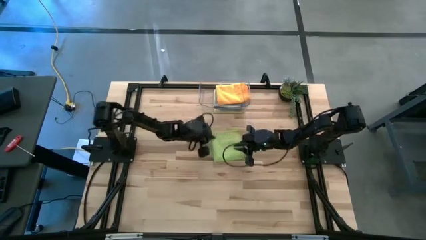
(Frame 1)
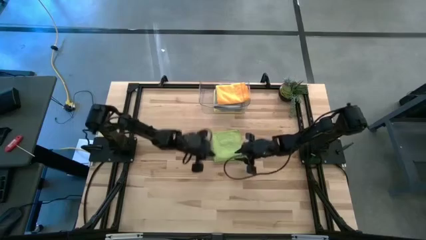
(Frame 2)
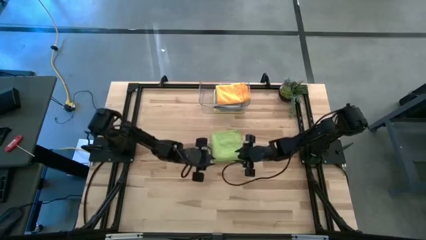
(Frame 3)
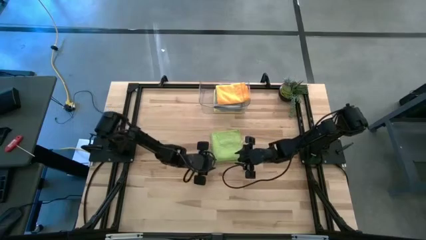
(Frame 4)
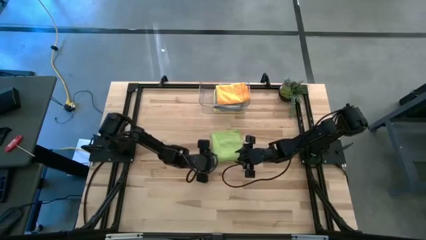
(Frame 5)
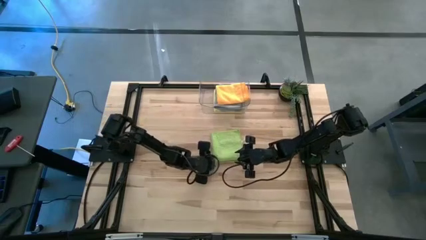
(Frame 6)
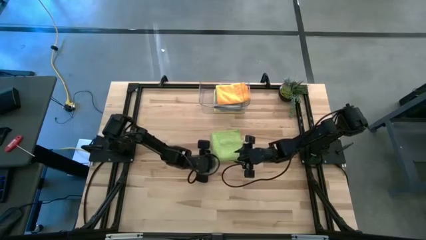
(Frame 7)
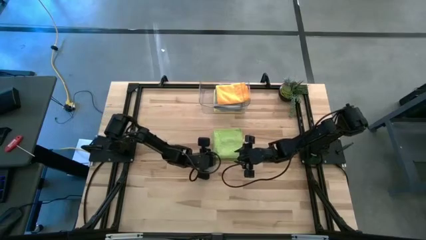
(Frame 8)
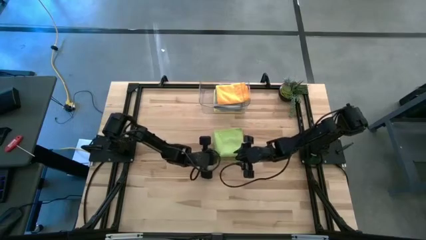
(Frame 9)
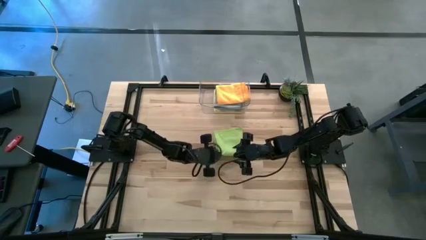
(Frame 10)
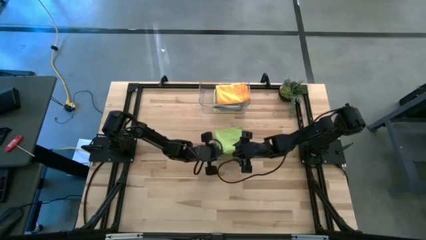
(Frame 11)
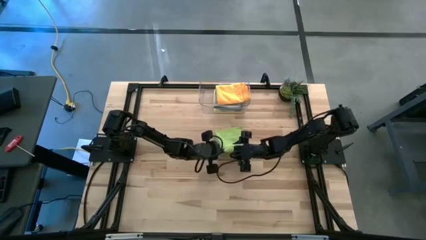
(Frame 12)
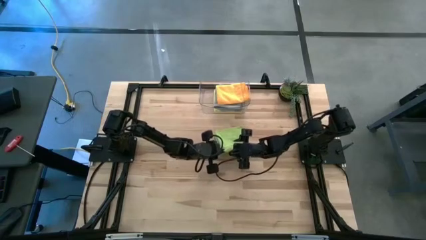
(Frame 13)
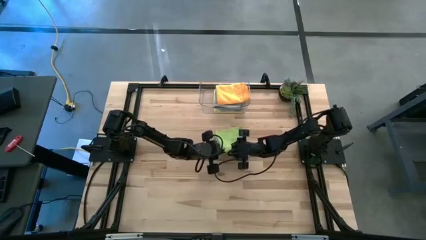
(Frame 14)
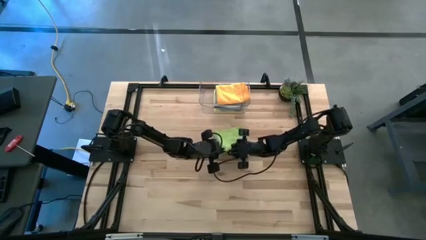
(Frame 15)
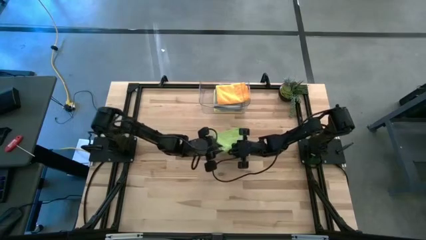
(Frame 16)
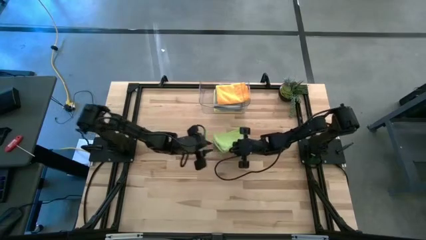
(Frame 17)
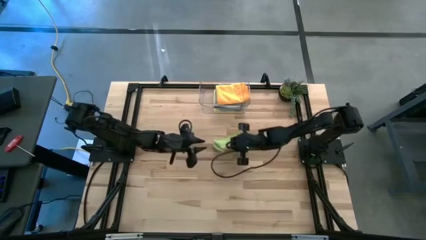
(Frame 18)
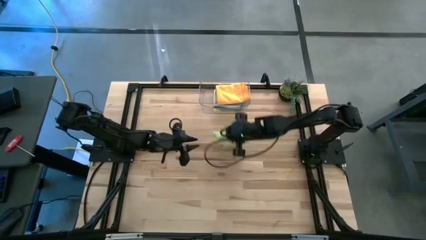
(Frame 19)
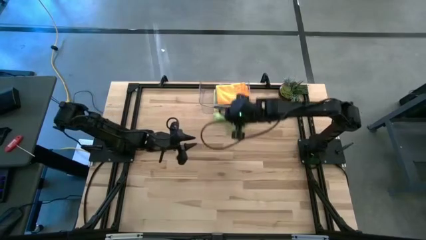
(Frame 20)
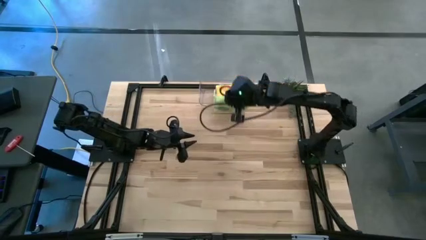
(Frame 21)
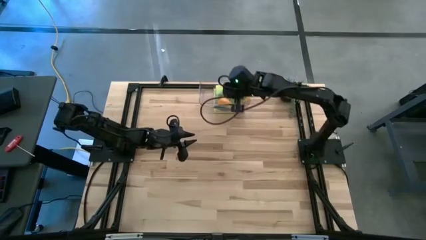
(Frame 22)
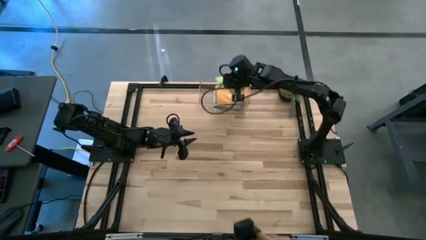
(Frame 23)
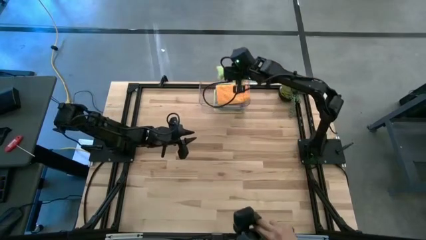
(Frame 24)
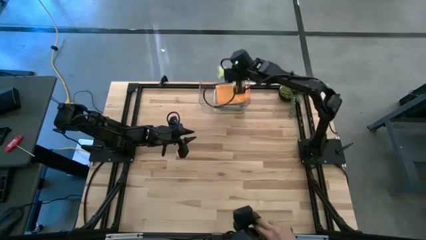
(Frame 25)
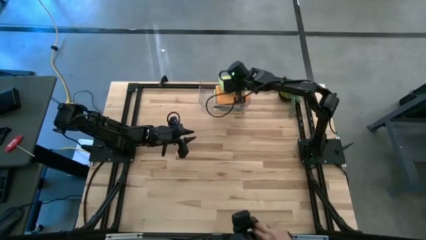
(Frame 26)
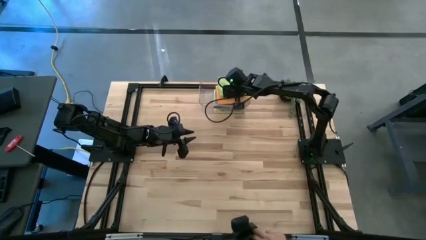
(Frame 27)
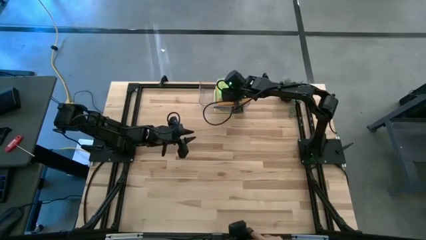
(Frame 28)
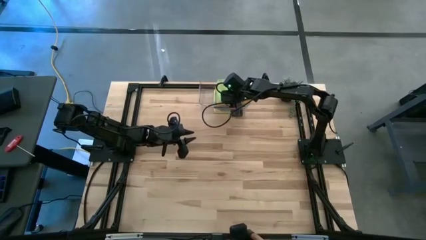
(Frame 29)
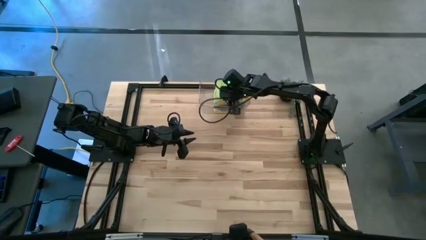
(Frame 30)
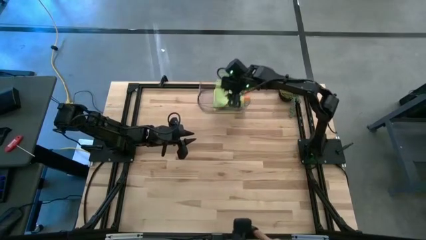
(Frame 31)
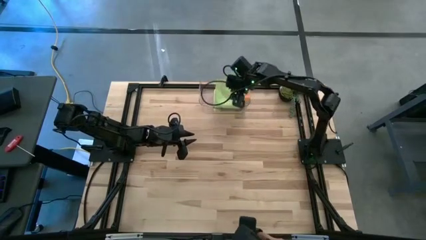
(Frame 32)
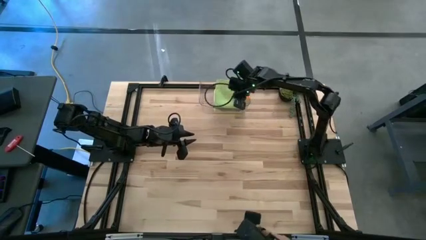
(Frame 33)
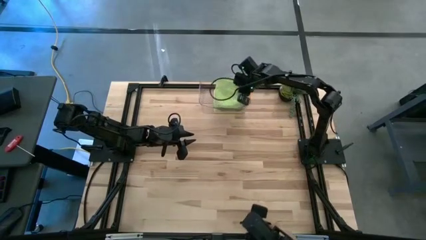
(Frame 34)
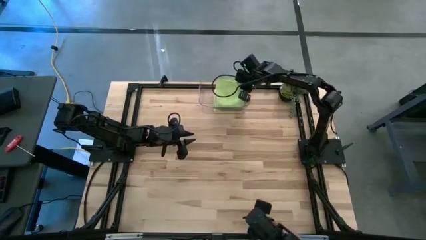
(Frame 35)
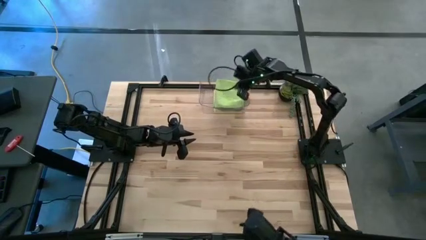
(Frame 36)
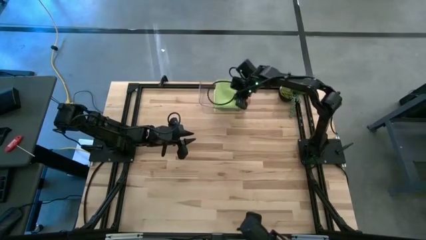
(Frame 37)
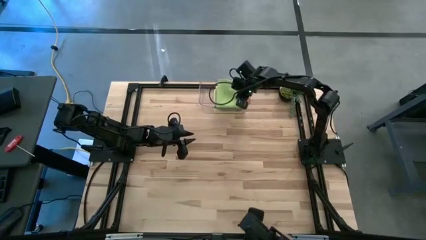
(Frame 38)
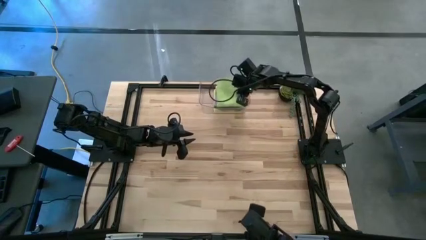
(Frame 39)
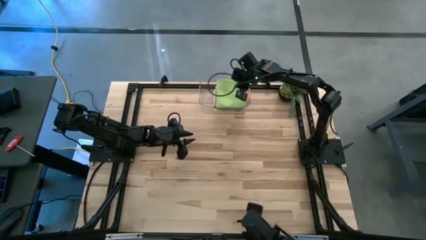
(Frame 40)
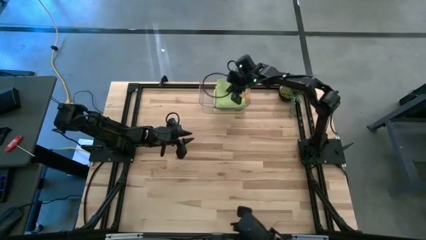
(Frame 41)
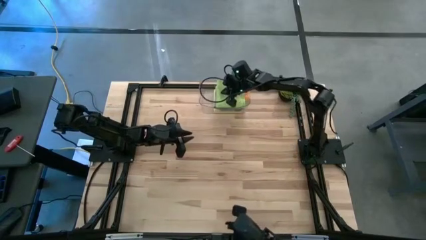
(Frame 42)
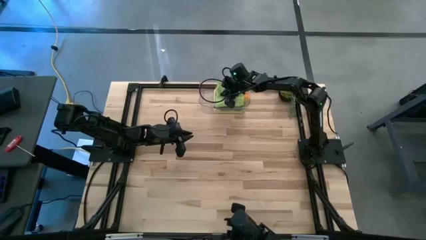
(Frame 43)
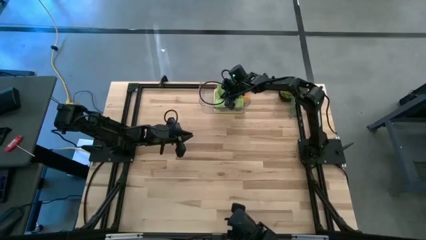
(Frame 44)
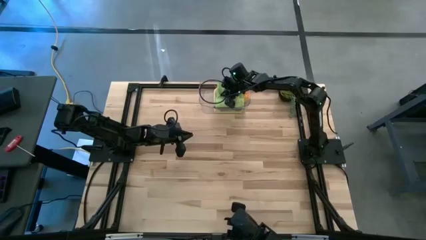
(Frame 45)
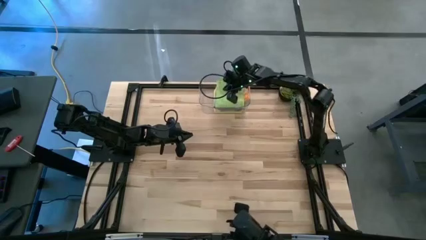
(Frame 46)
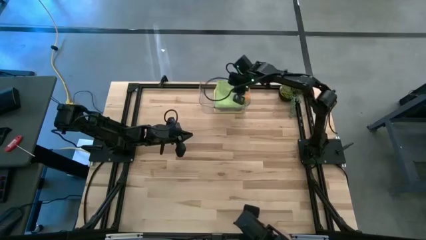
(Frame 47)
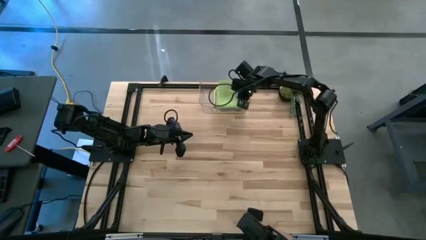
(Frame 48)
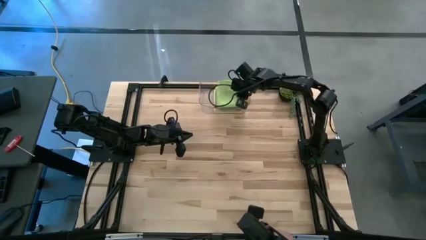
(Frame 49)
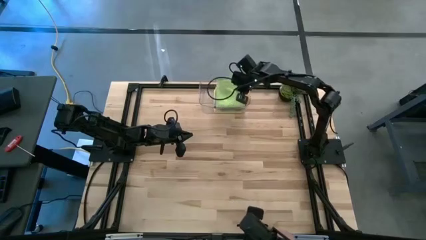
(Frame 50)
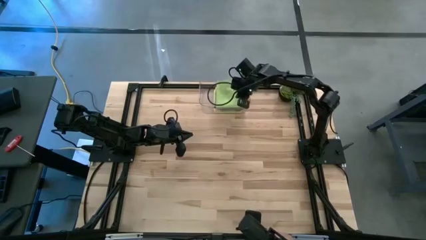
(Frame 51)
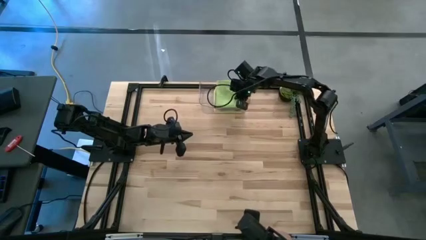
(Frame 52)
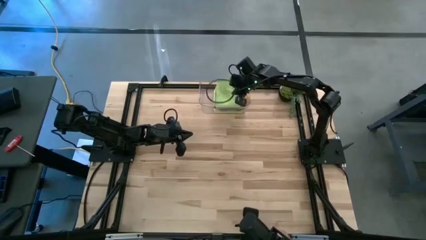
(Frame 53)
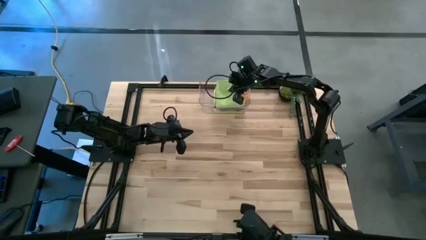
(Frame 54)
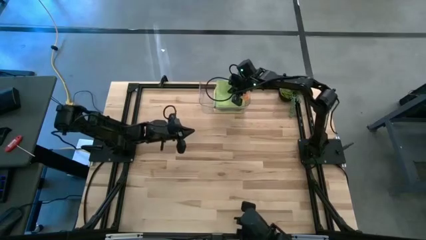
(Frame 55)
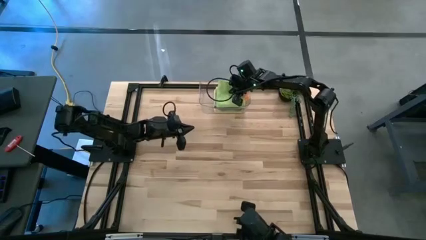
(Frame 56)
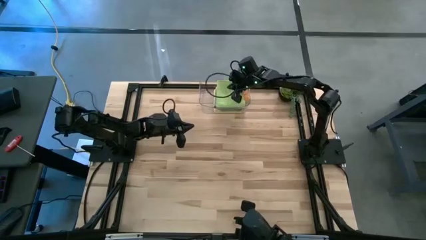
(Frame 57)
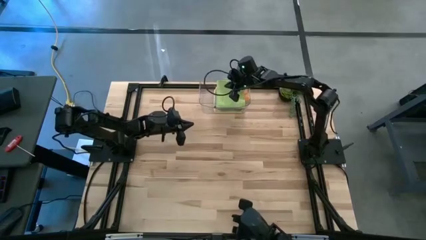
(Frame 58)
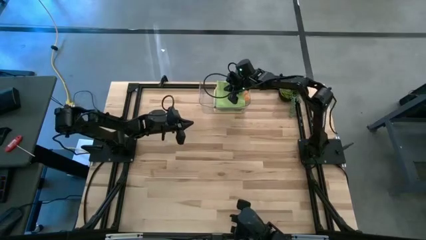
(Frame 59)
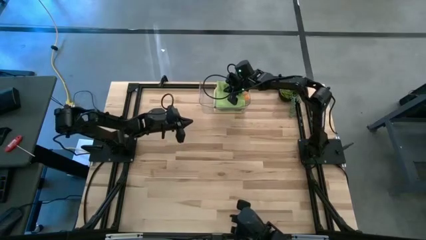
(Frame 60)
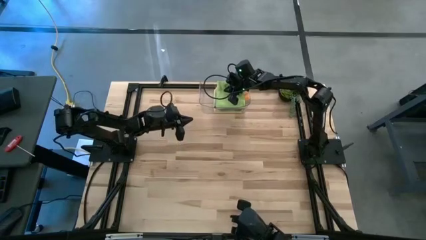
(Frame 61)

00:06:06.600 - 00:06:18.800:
Task: Fold microfiber towels
Stack the green towel on top of the orange towel in the transparent bin

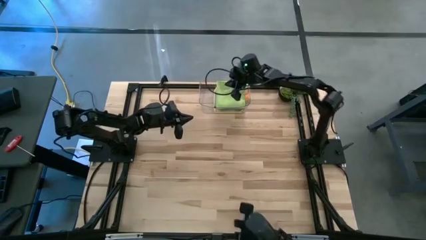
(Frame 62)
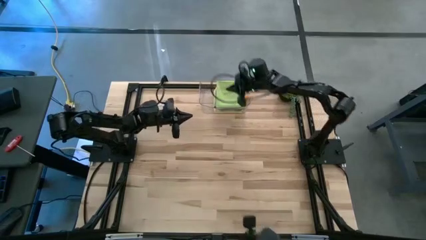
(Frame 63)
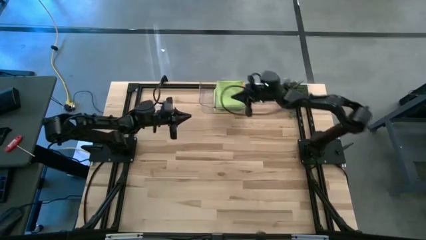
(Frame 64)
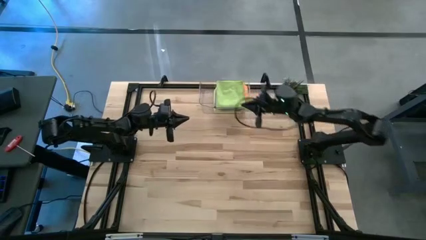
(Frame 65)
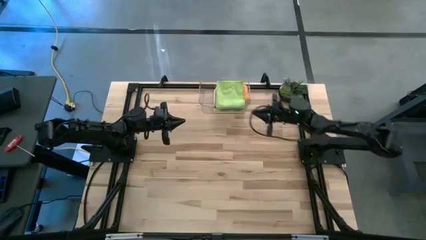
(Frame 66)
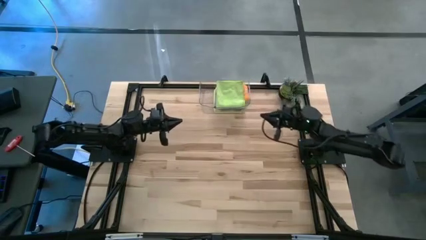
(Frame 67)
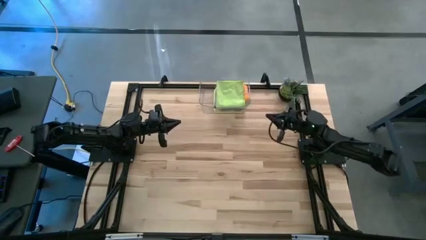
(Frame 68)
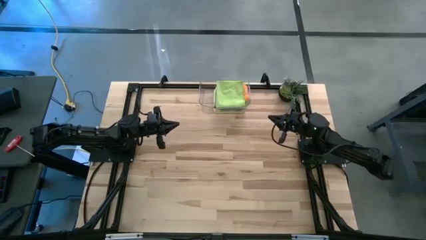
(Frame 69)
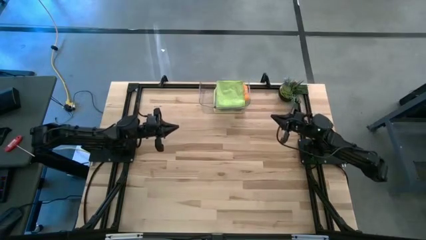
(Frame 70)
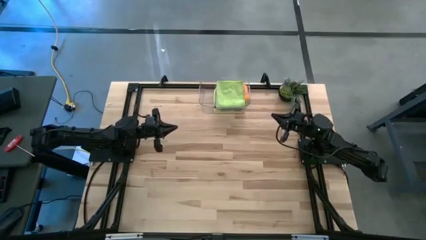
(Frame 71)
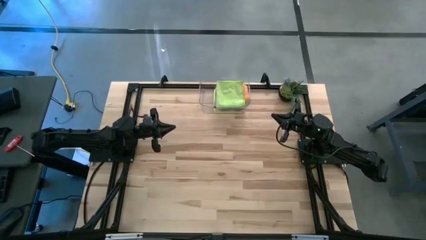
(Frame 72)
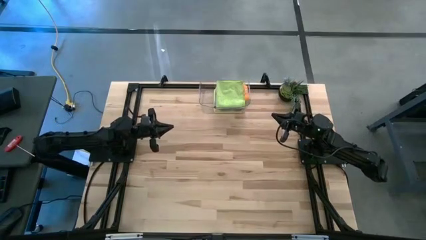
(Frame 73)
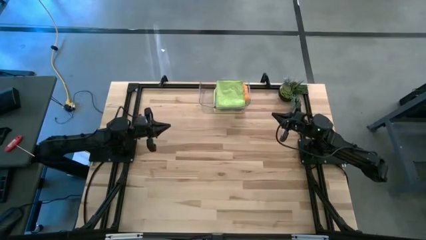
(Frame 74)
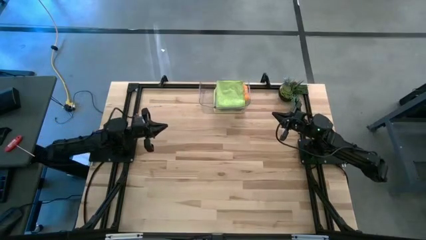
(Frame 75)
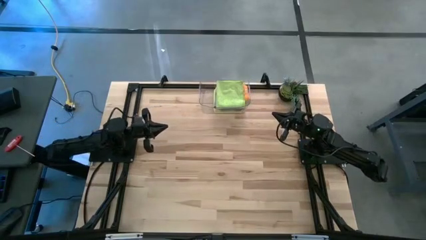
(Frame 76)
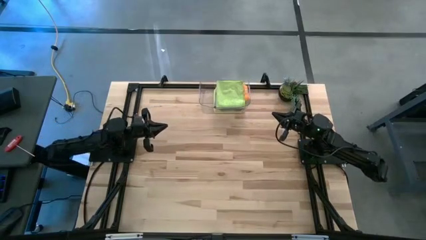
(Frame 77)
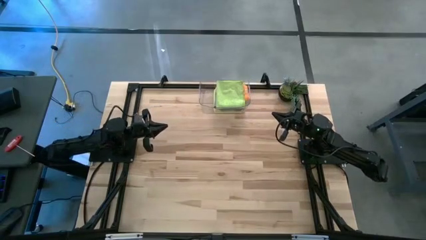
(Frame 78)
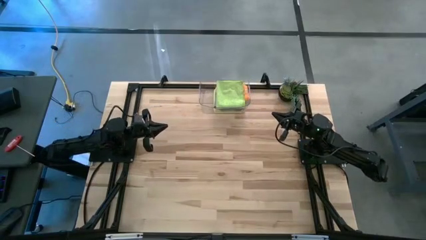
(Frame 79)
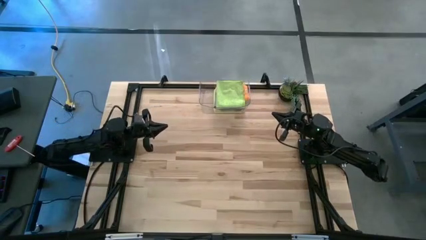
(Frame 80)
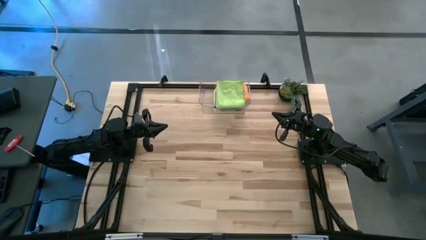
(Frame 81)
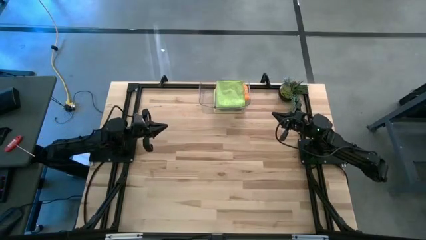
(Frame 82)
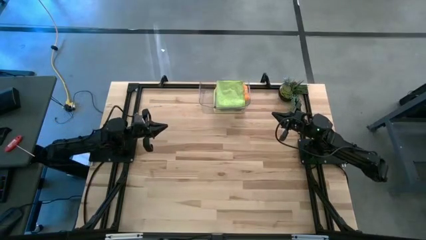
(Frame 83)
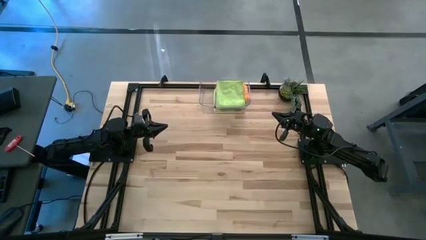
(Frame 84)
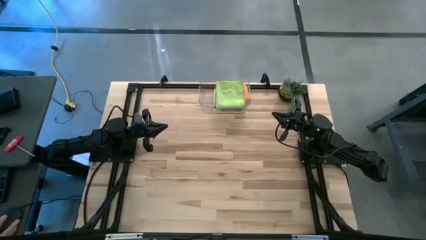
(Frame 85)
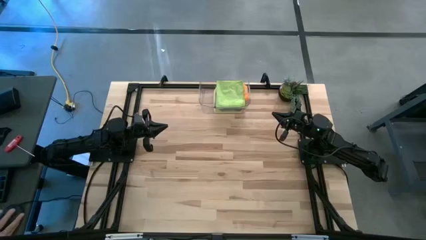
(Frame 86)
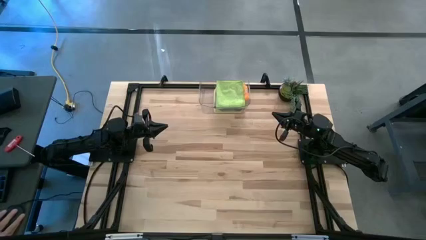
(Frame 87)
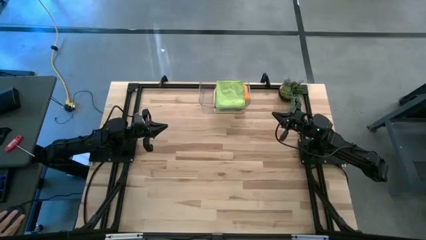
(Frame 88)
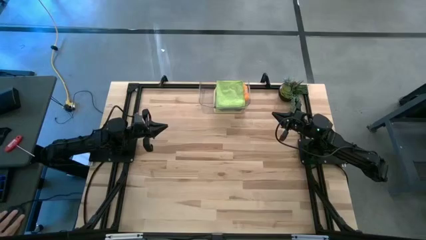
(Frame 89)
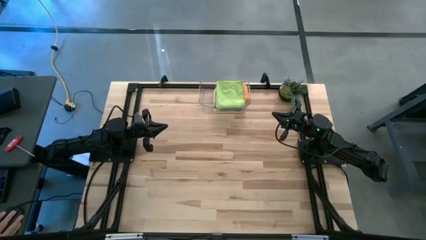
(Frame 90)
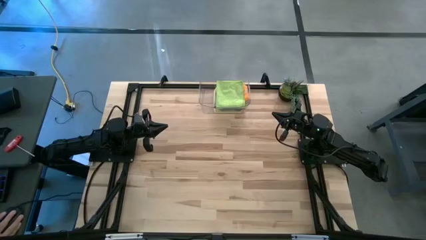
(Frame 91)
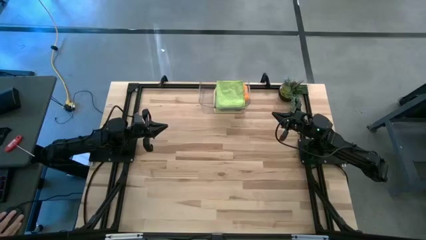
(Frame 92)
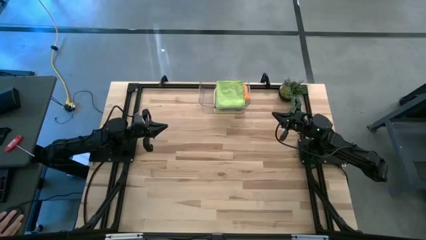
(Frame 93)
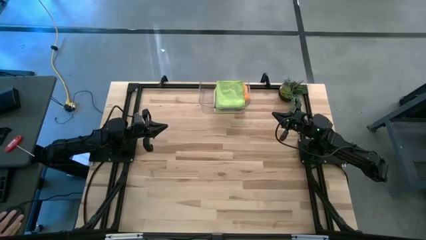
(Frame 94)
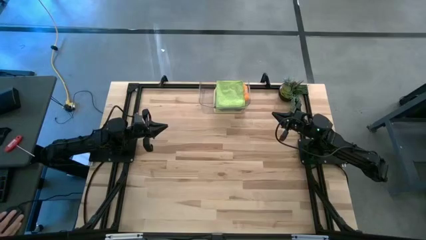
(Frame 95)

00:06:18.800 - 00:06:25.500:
Return to Home Position
